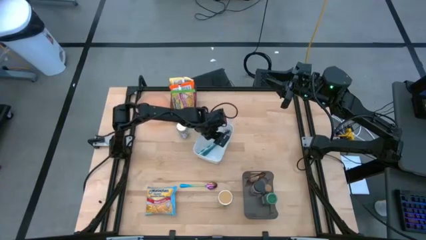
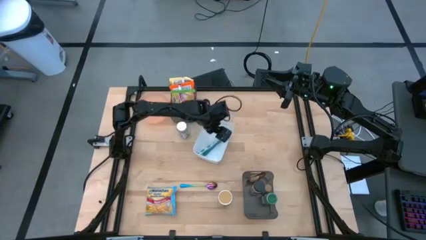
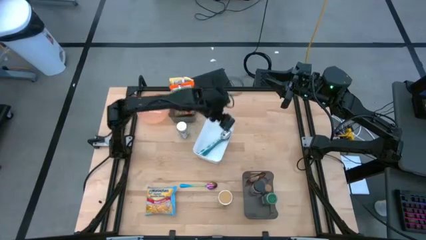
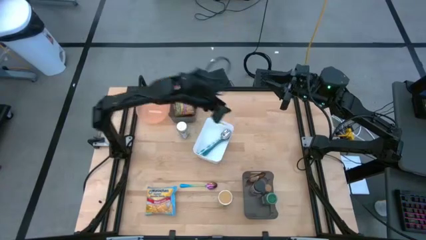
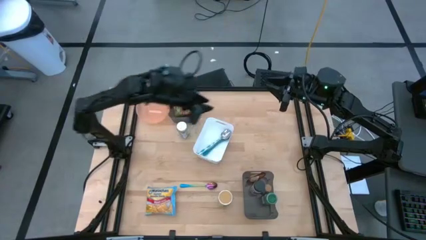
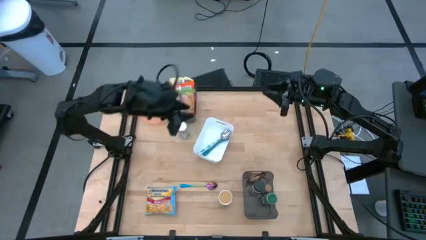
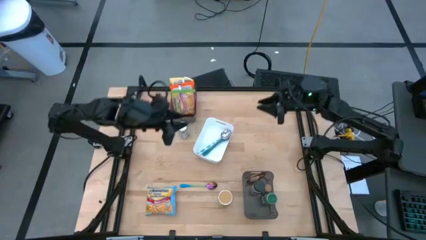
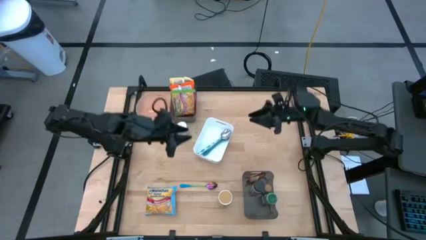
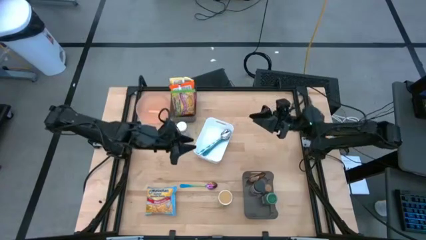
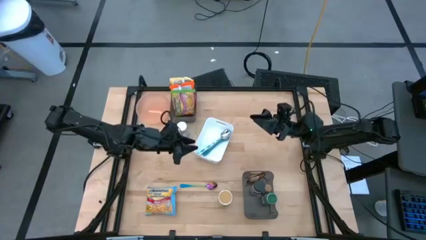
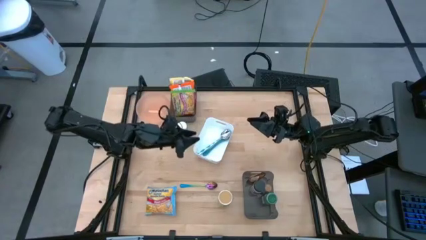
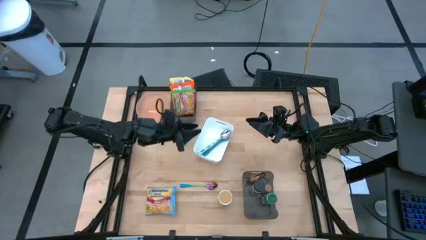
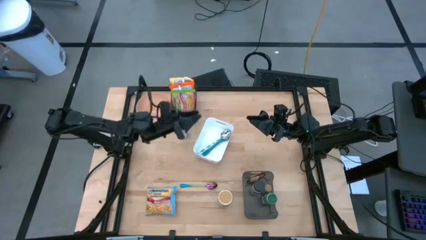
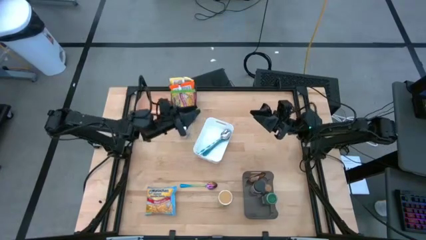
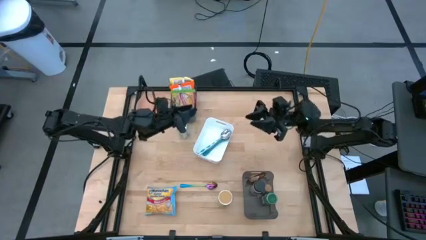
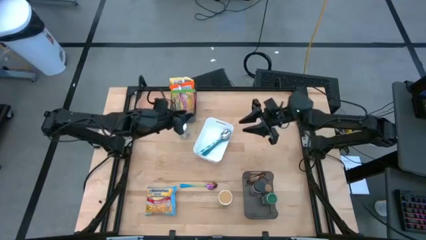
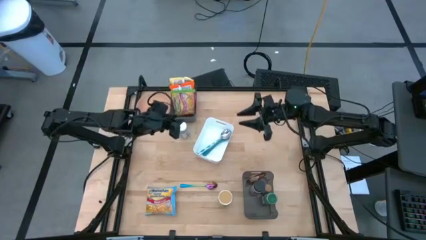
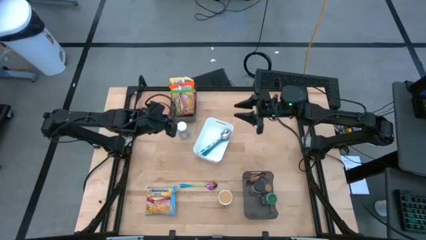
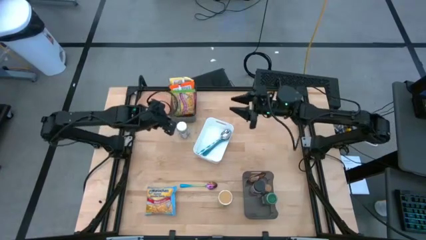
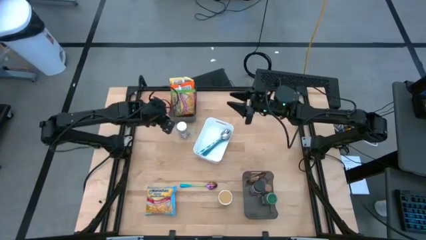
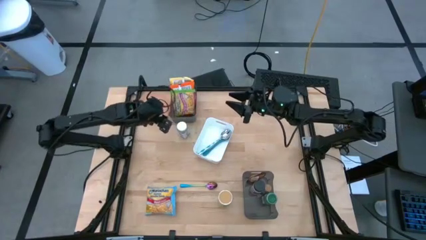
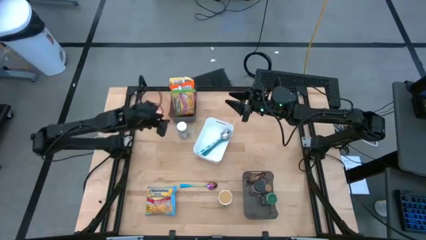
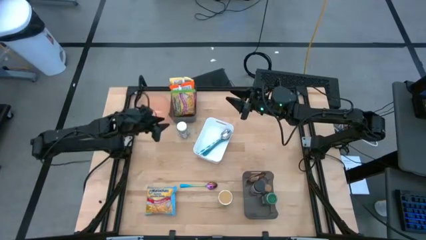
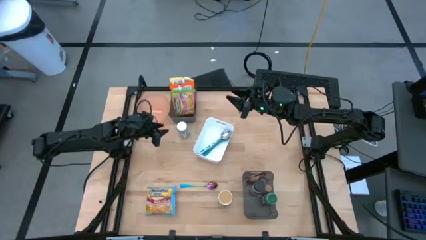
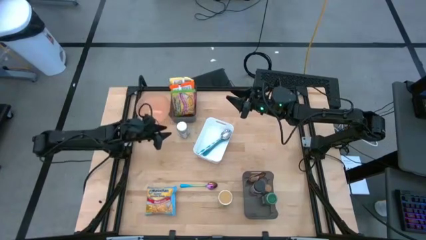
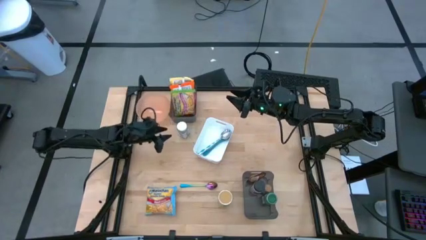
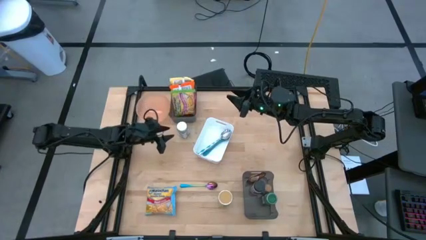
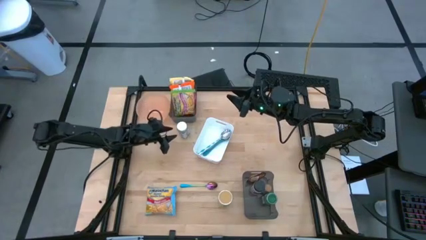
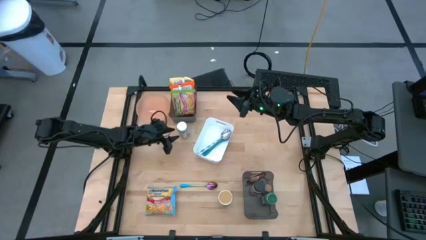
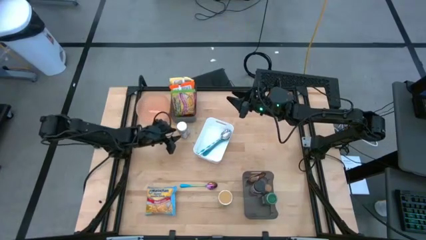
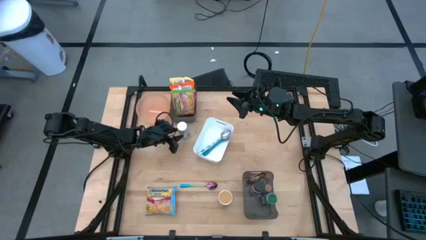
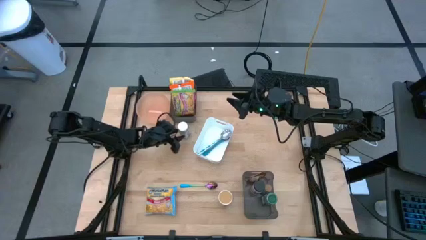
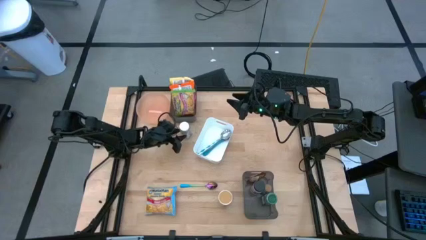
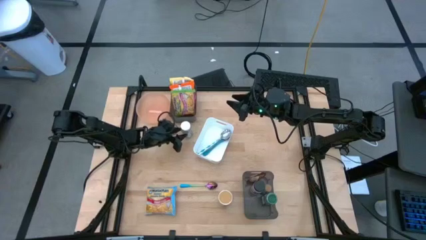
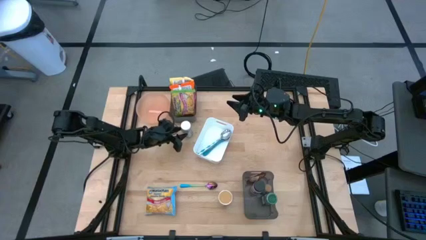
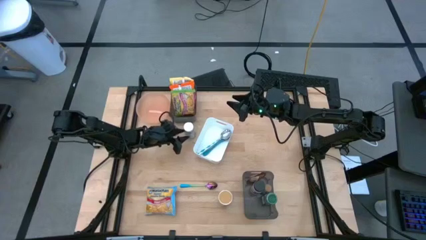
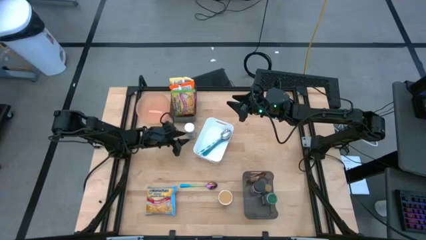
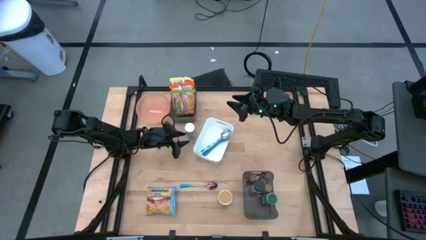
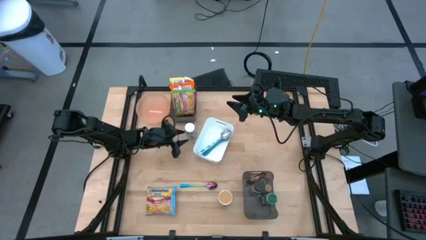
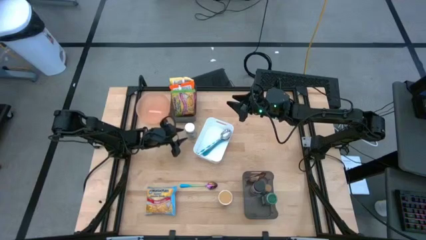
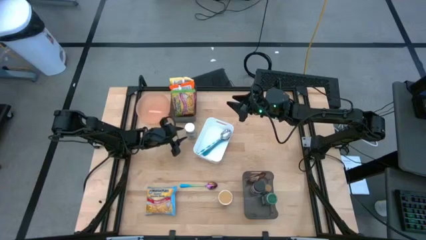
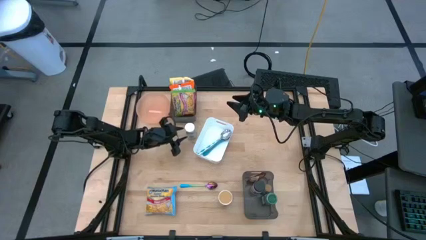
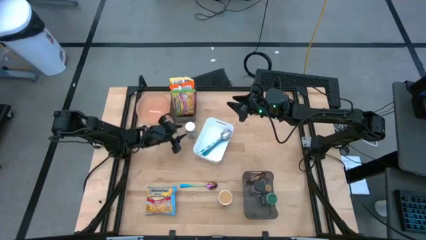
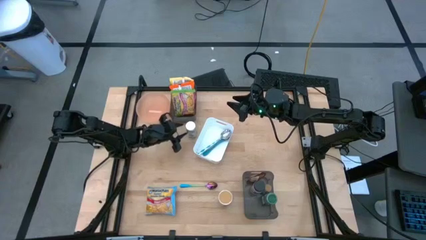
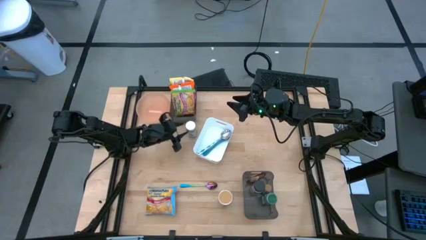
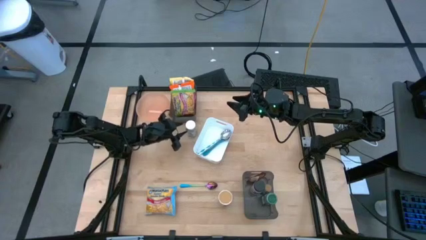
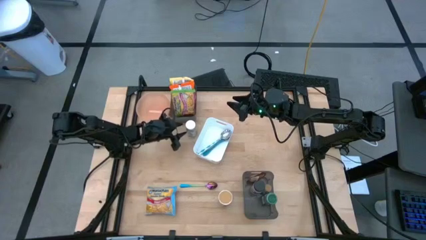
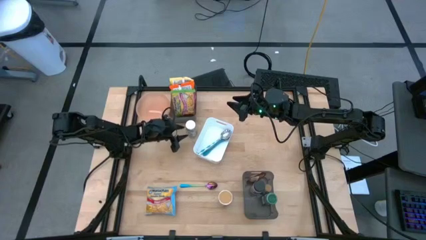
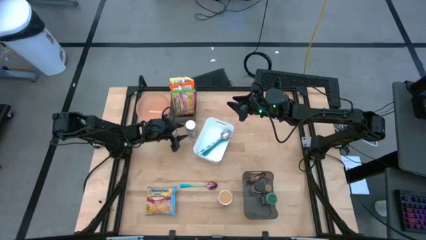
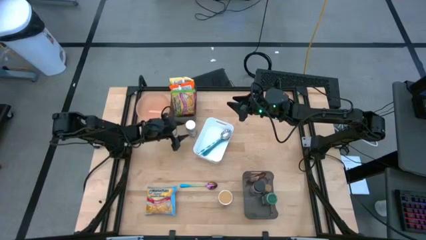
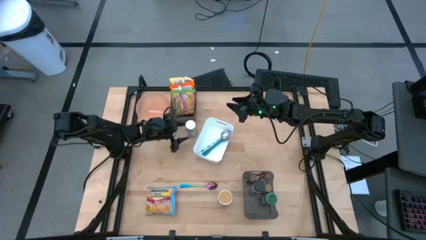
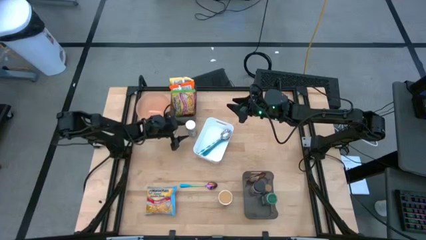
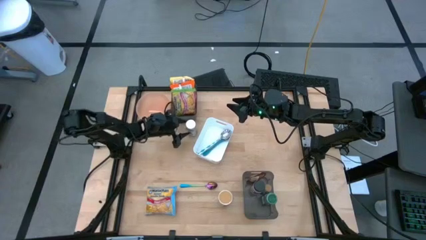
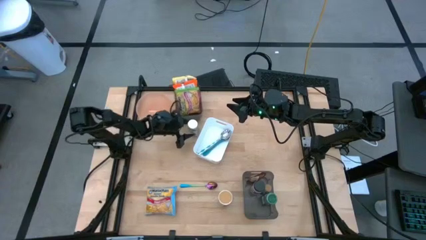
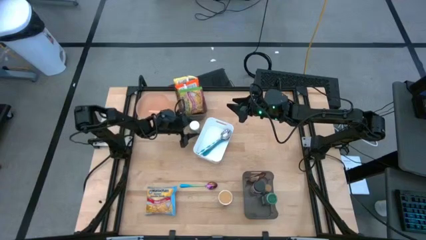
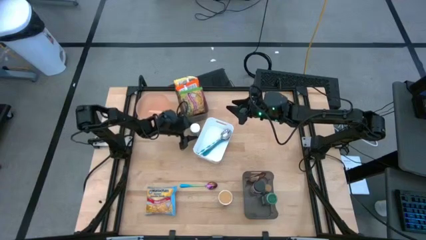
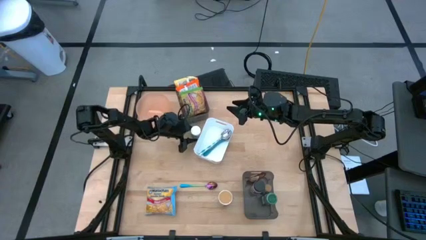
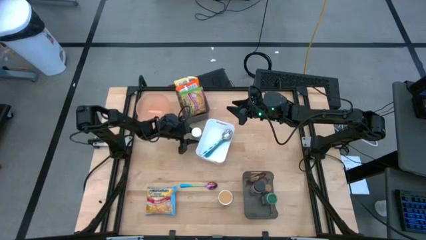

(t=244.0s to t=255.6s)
Task: Pick & Place Food Item
Put the white seasoning bottle into the bottom black bin

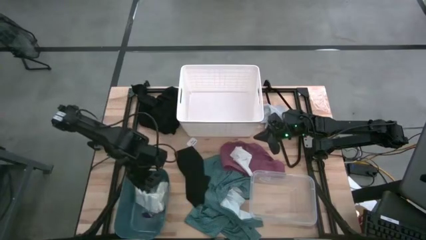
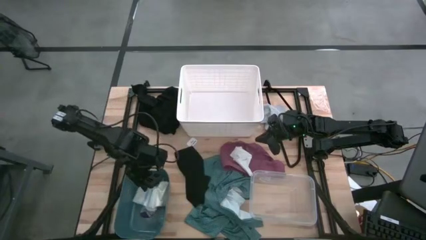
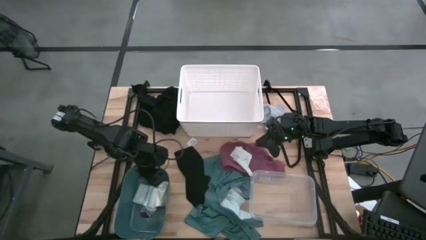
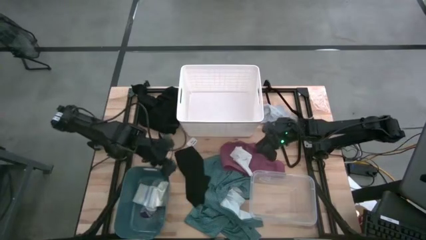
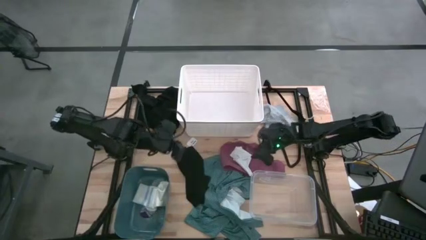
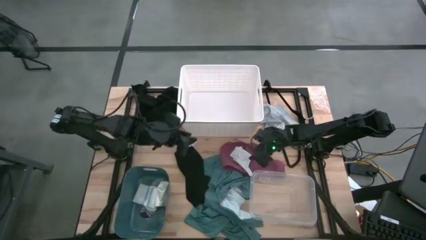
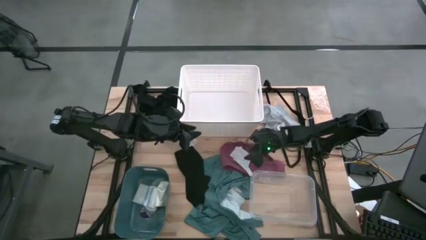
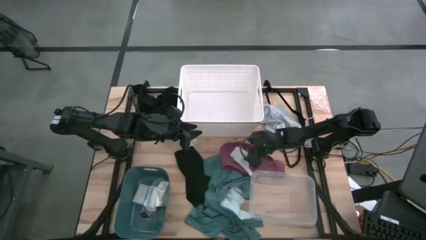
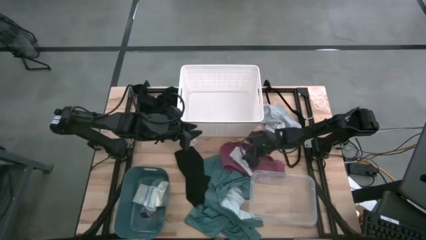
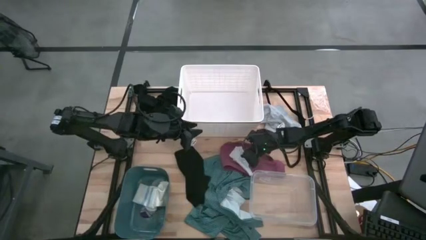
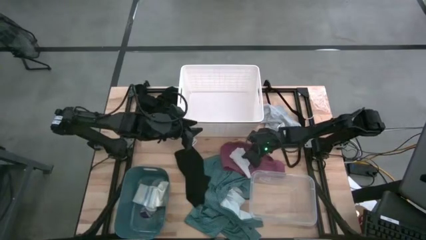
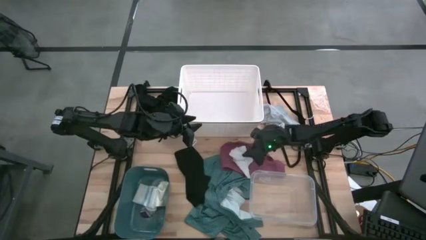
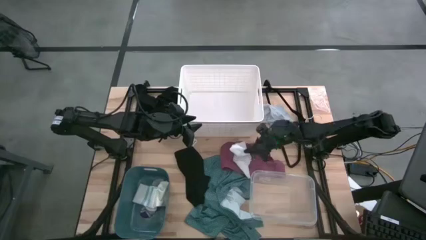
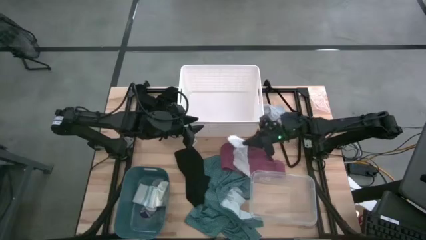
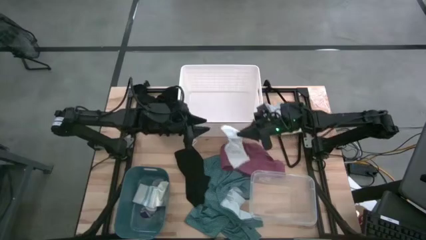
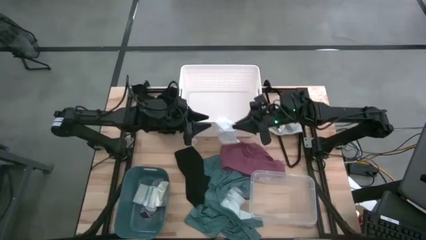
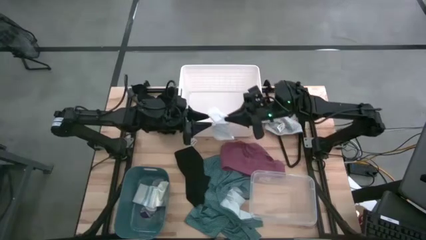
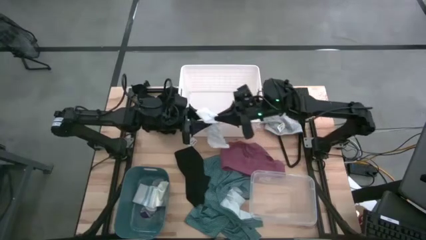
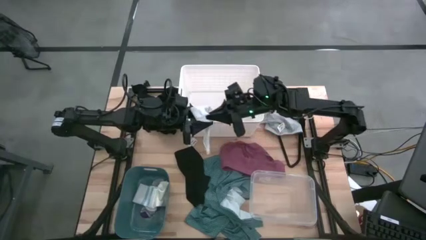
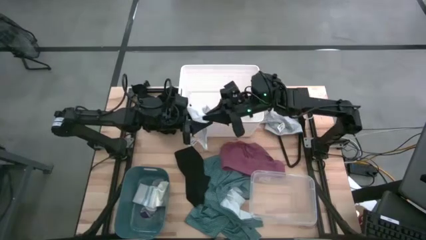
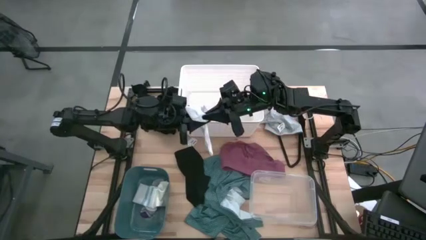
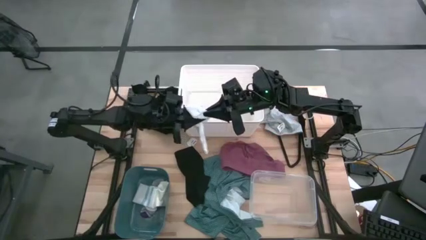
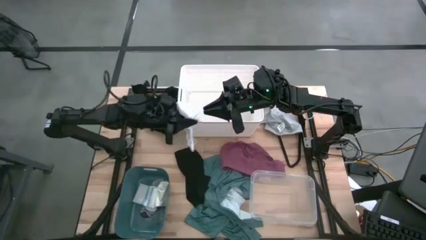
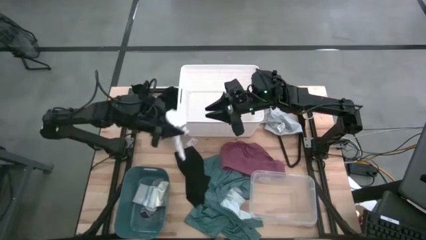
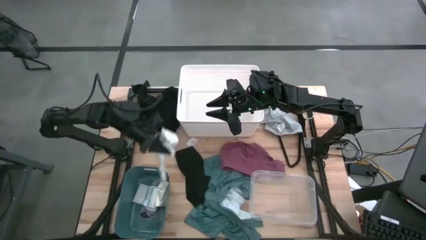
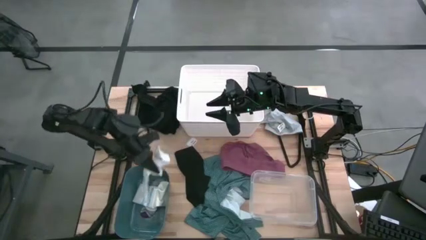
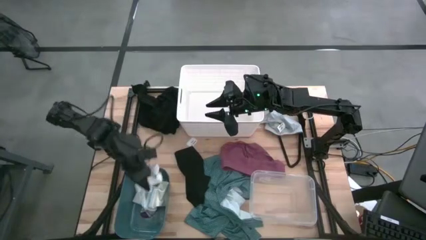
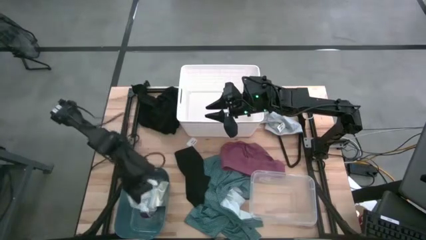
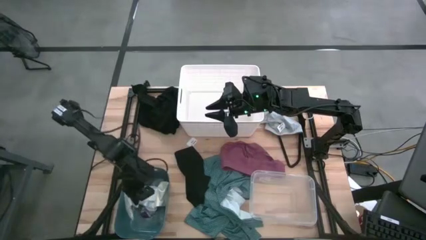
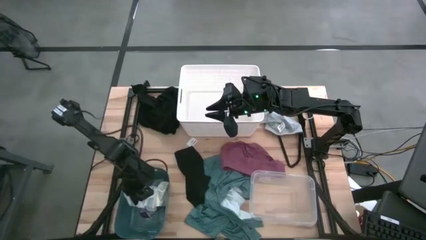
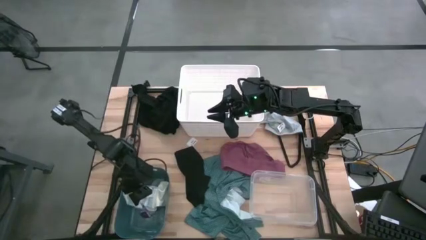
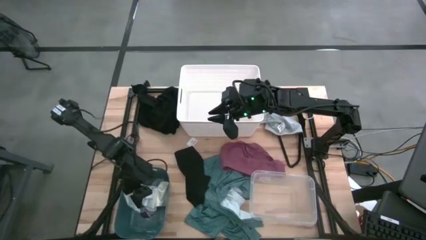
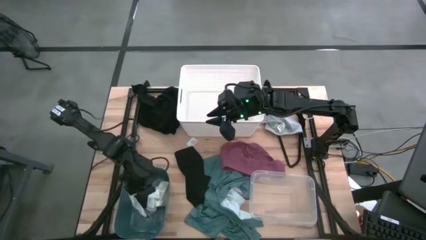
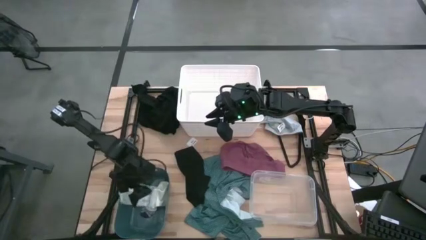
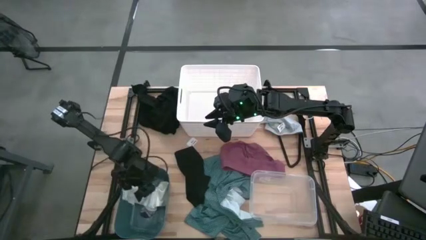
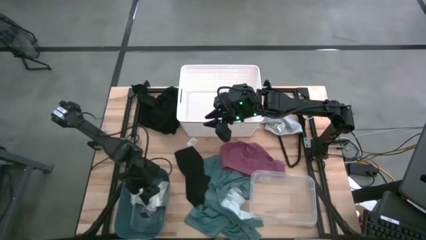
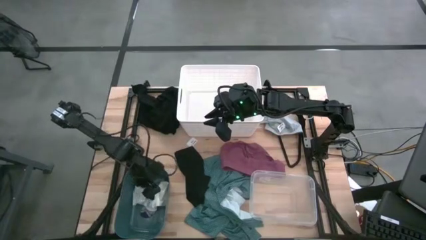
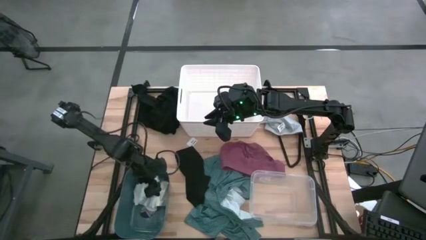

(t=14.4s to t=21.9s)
Task: Pick & Place Cloths
Put the white sock into the blue bin
